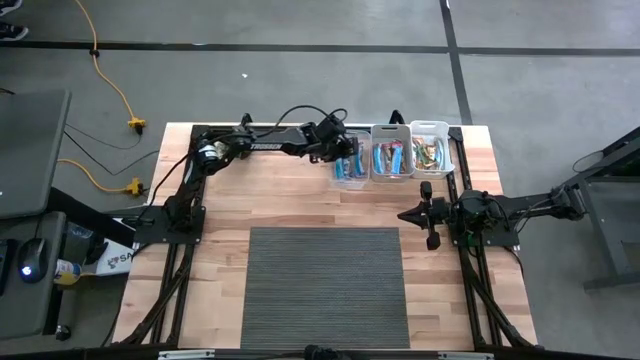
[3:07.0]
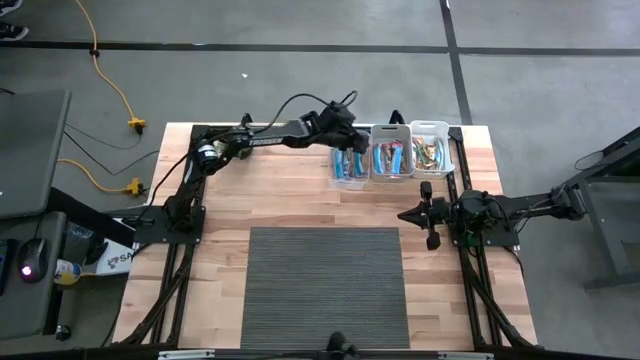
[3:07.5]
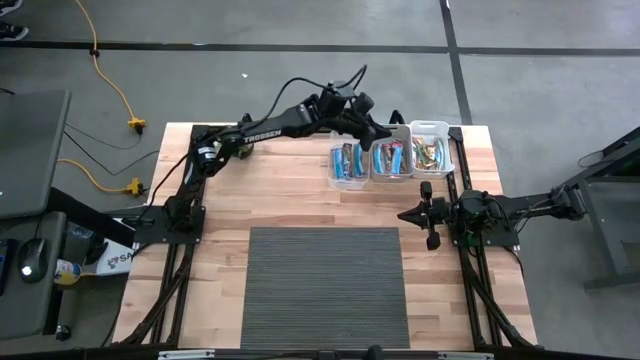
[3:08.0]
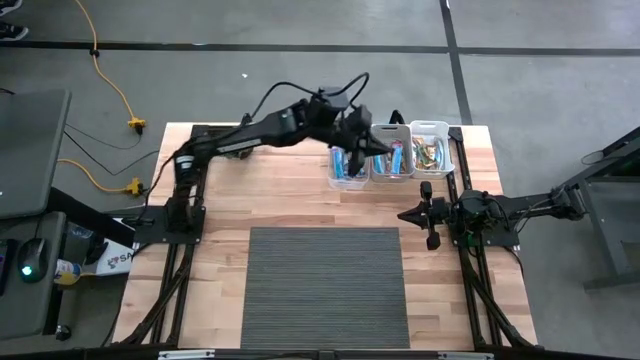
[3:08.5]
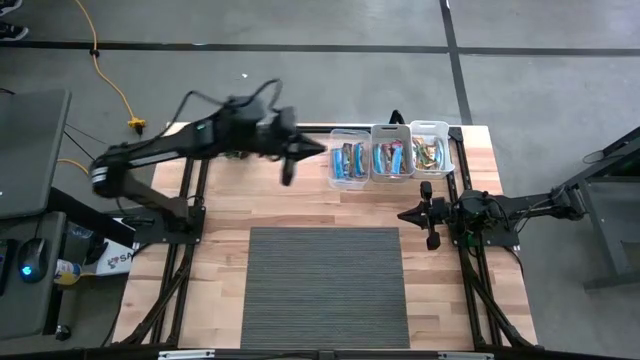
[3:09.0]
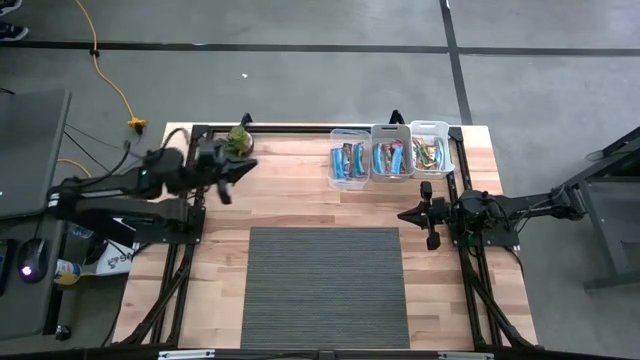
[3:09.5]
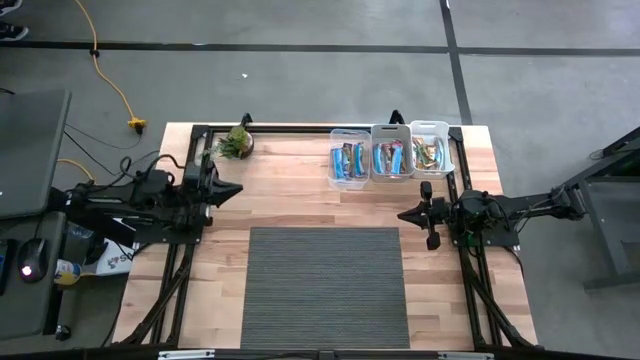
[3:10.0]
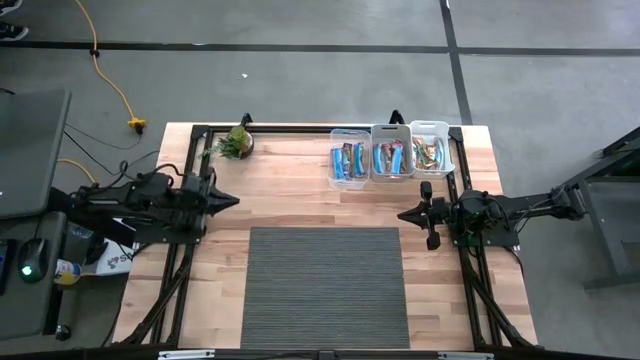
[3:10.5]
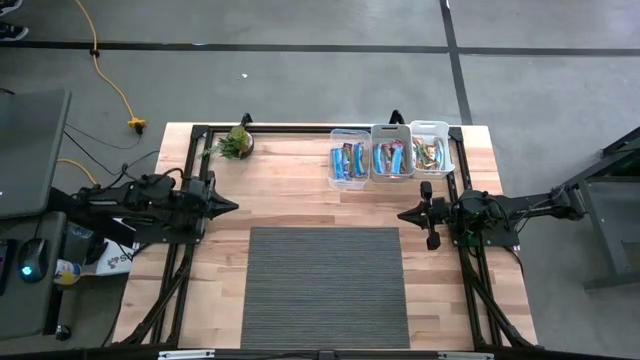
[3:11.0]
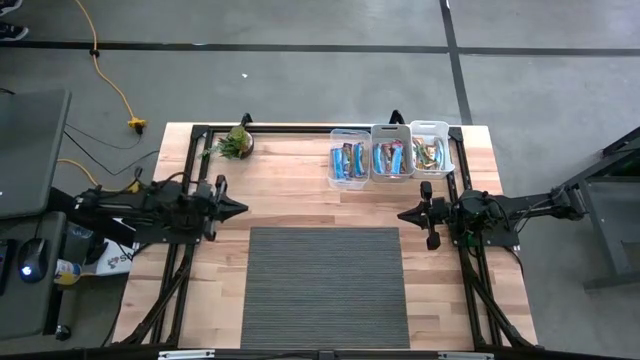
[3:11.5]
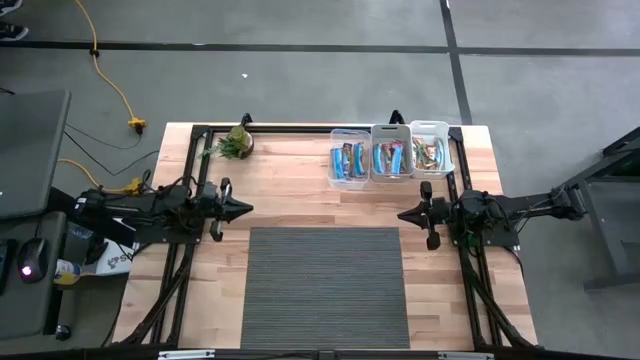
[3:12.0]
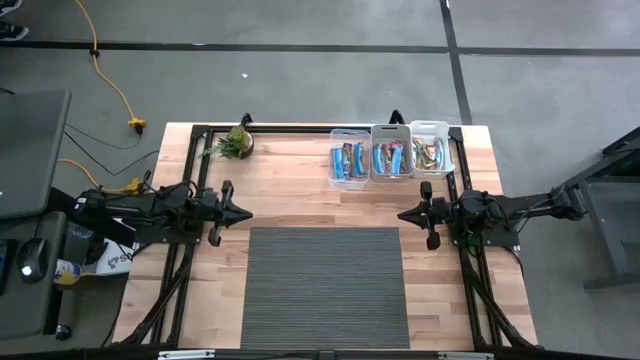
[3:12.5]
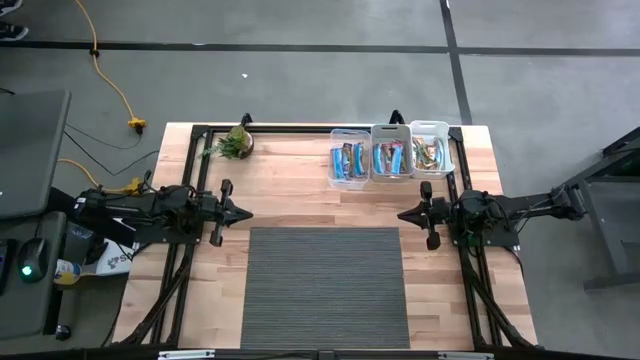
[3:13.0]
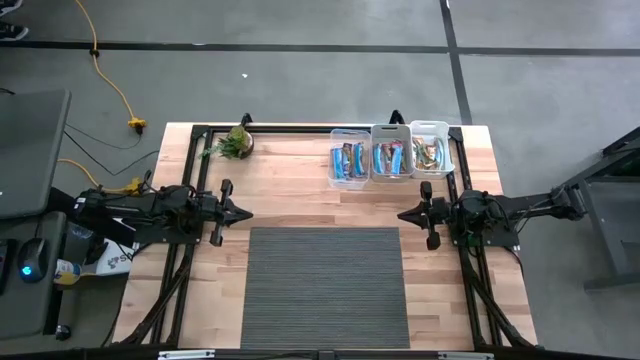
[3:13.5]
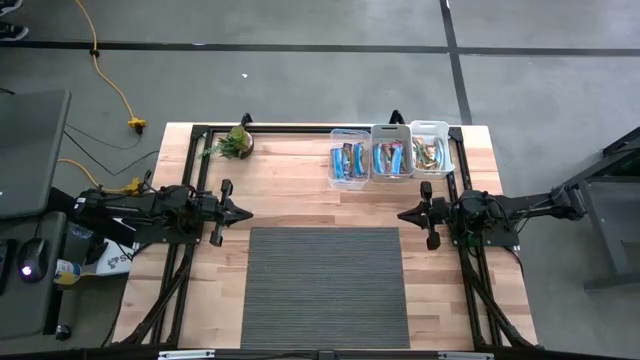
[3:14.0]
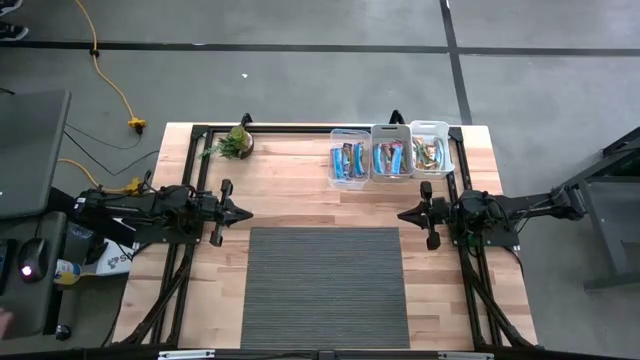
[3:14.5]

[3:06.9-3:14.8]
Task: Pick and place Granola Bars by type
Return to Home Position

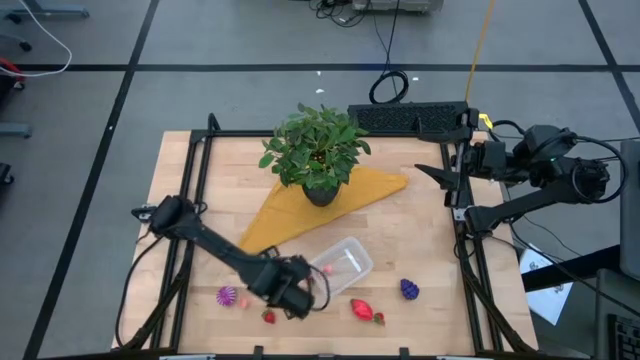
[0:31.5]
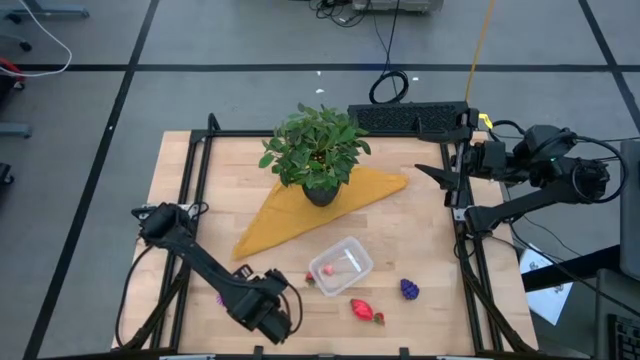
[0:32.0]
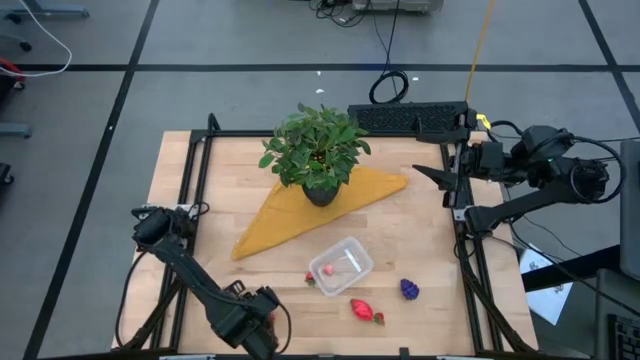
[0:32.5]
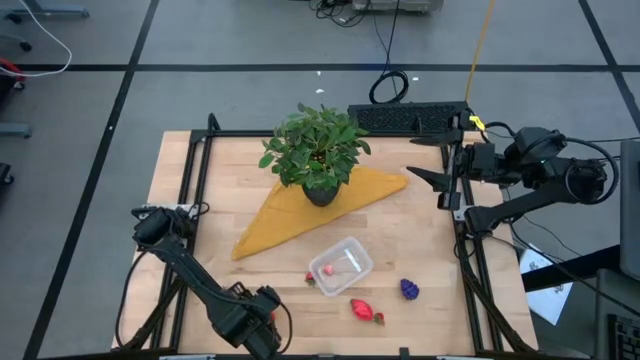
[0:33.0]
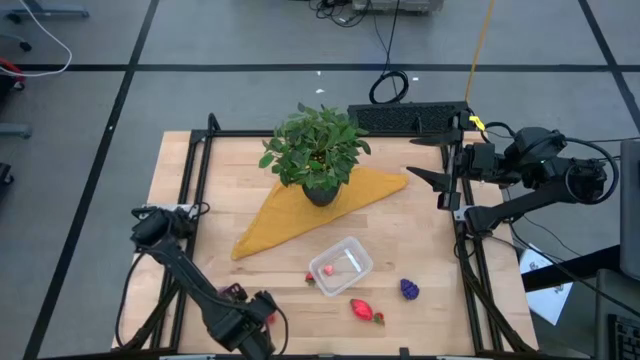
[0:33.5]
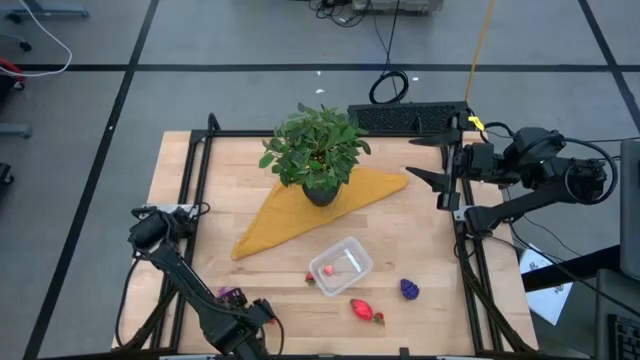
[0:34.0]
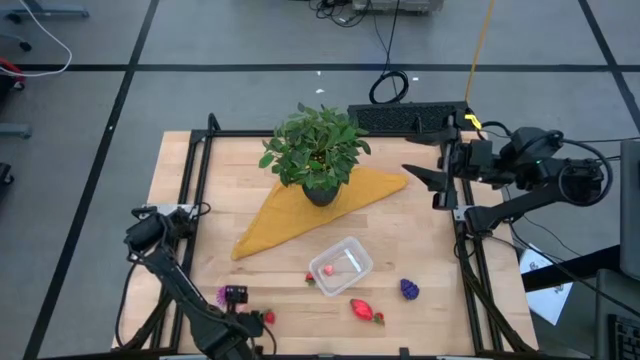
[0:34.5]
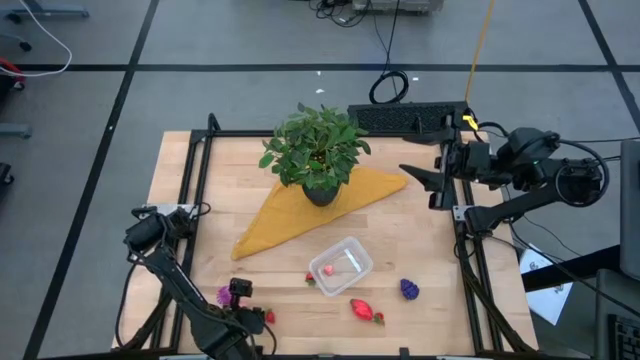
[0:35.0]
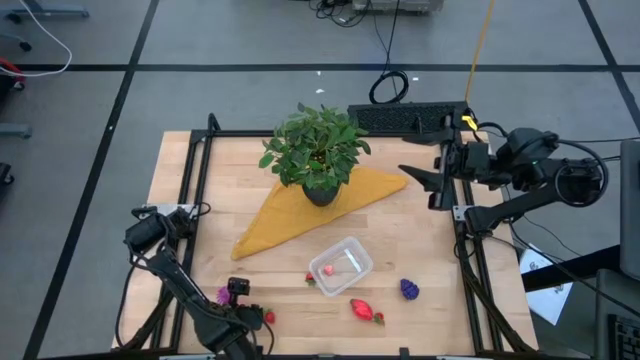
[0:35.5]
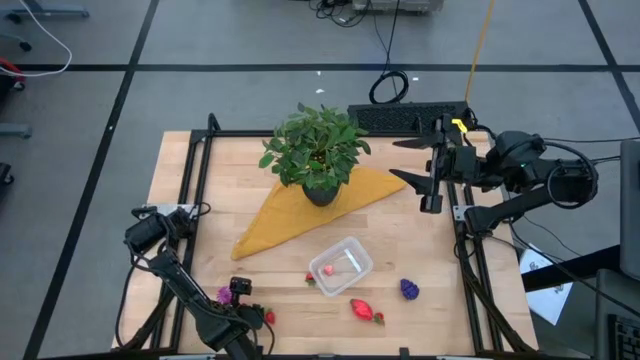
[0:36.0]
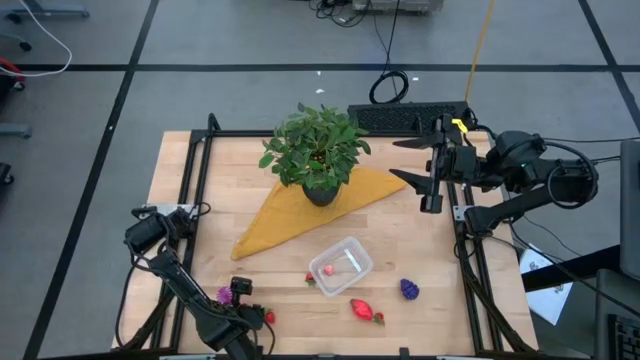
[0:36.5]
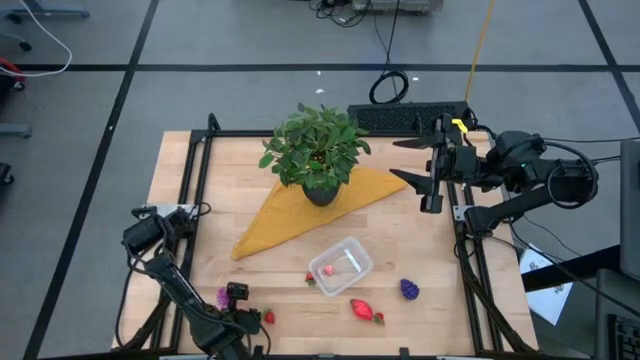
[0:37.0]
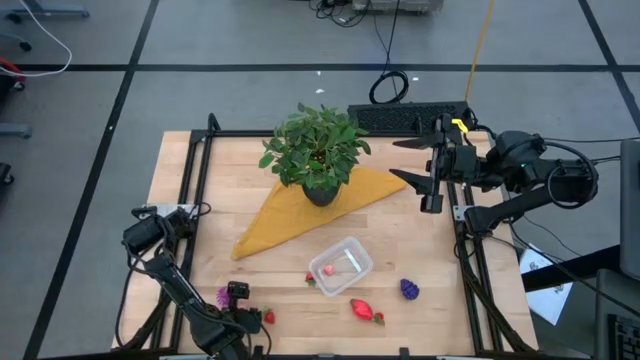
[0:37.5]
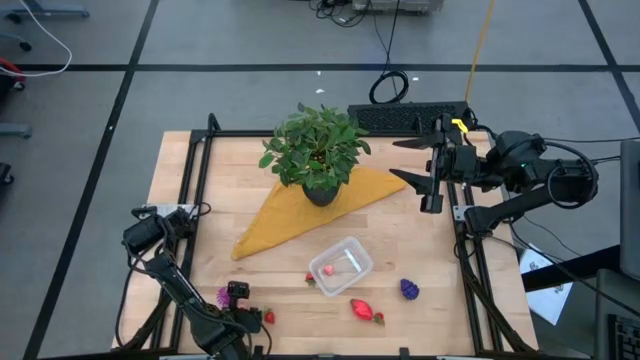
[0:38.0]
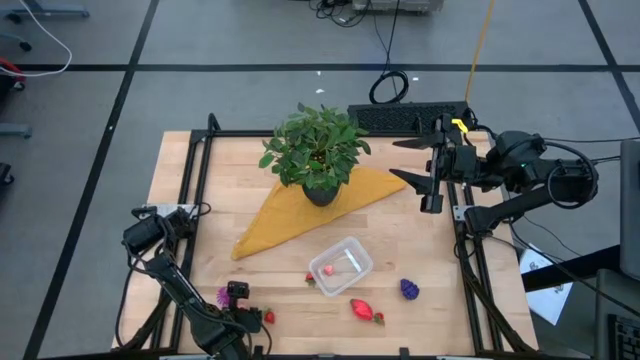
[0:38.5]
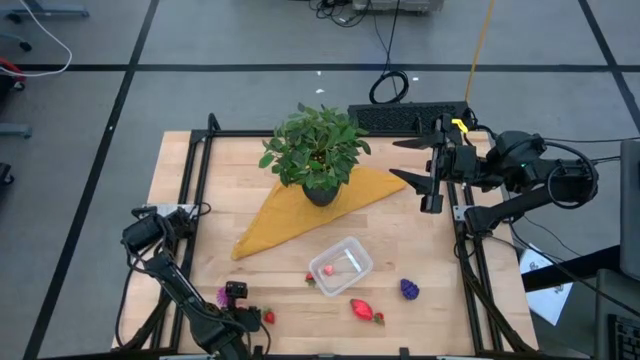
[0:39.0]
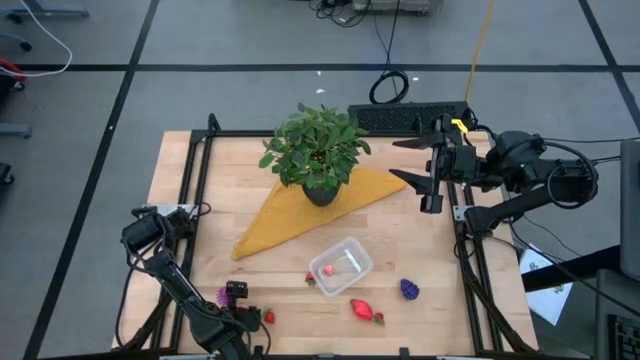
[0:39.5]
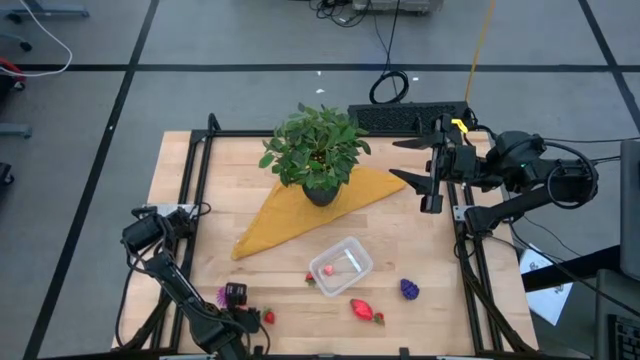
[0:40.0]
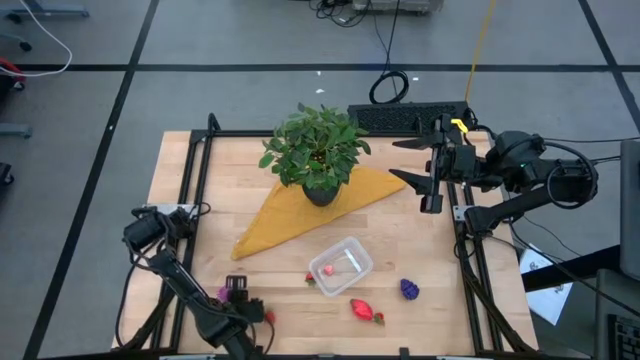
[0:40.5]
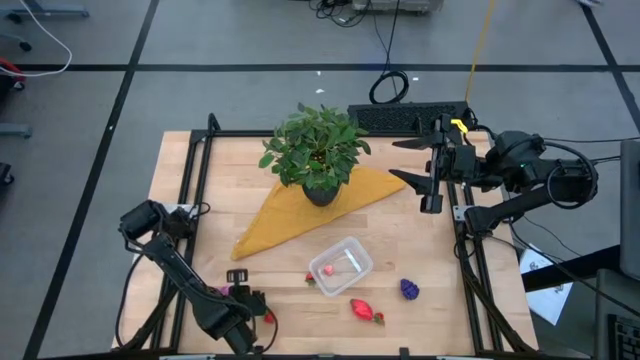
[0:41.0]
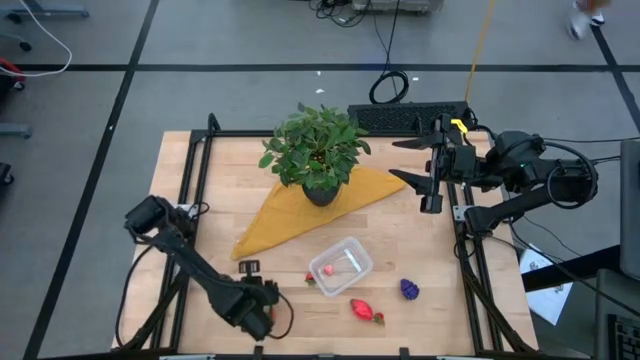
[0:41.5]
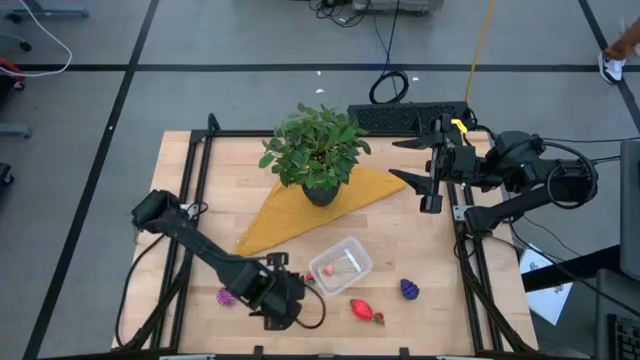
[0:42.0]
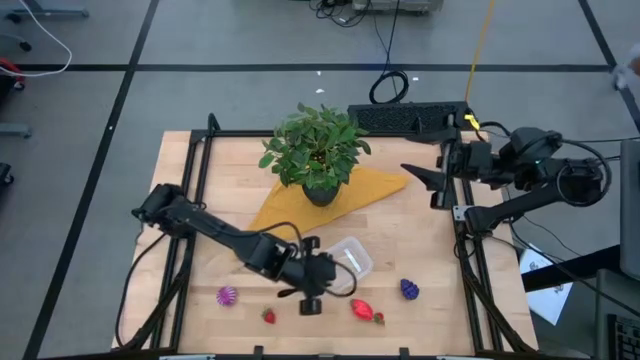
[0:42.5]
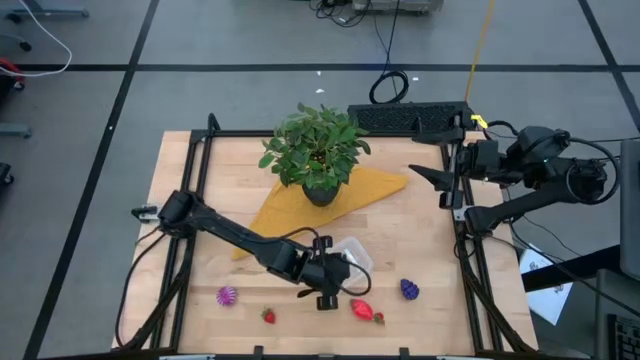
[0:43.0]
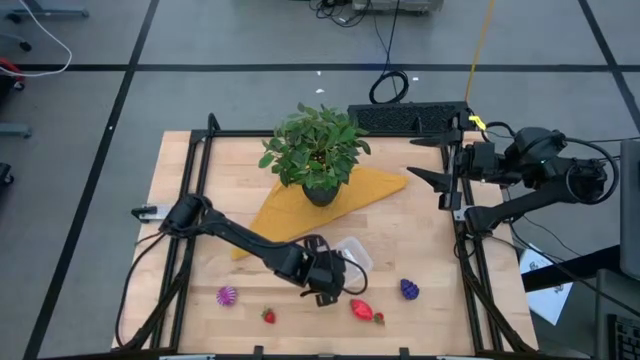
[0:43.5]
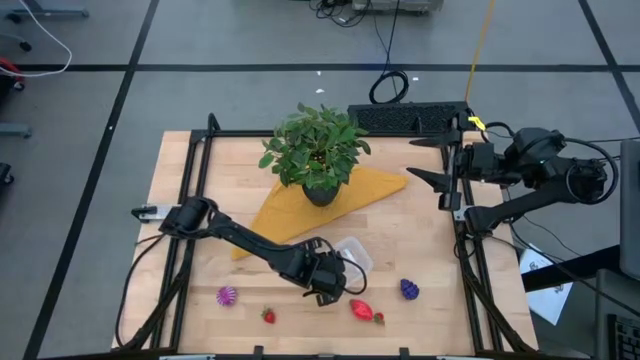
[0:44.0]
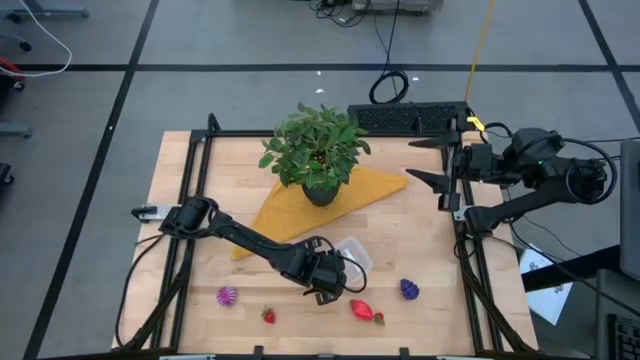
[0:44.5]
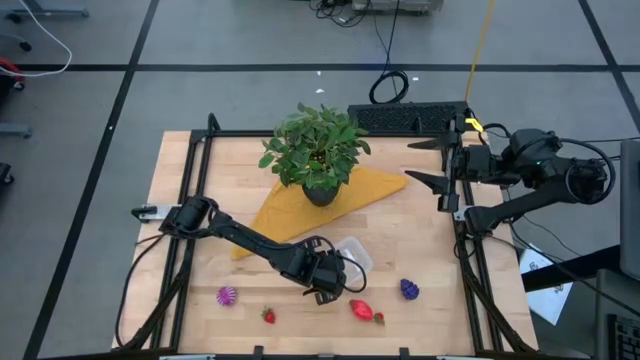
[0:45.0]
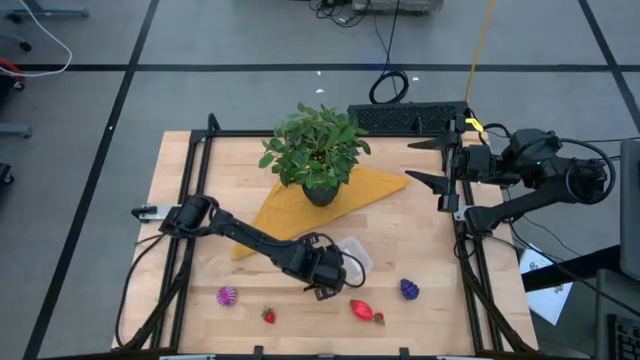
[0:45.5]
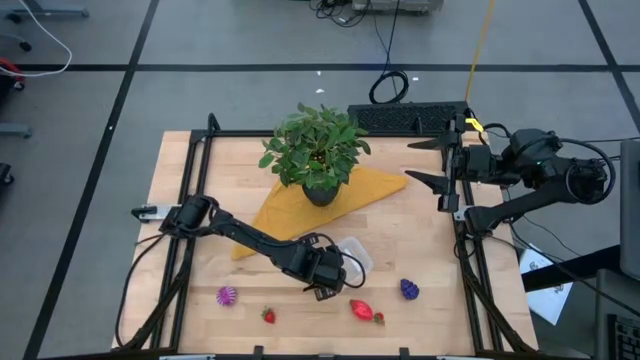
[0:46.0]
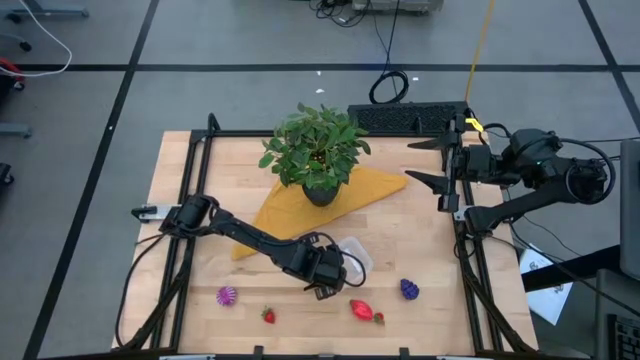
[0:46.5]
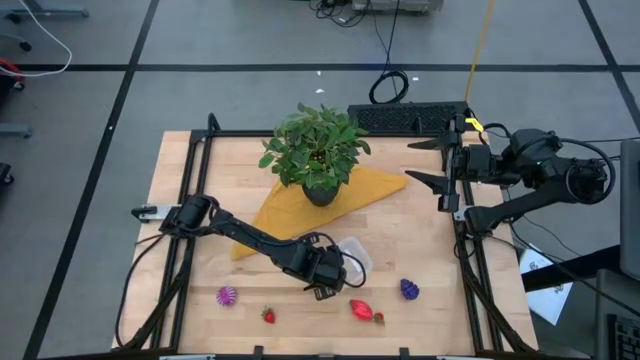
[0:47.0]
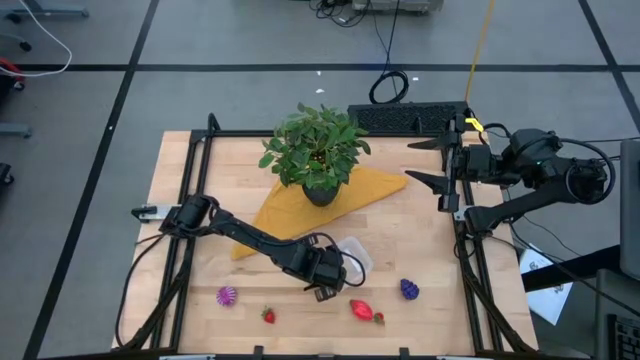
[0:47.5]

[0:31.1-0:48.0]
Task: Pick and placing Produce into tupperware
Put the lychee into the transparent bin
